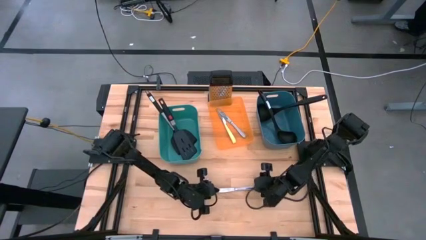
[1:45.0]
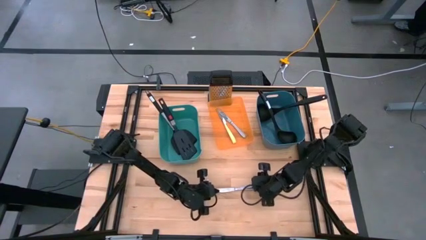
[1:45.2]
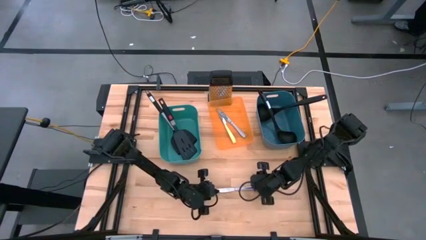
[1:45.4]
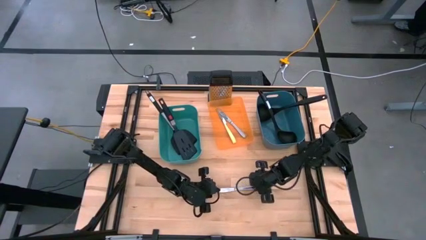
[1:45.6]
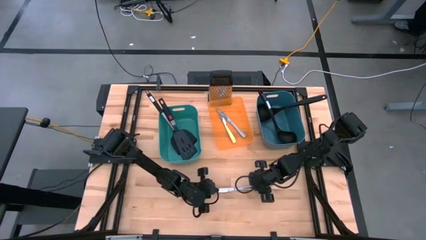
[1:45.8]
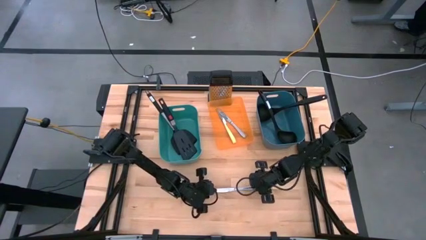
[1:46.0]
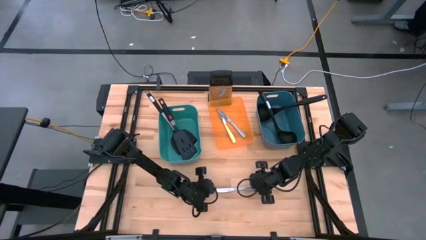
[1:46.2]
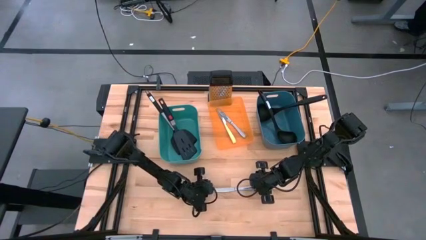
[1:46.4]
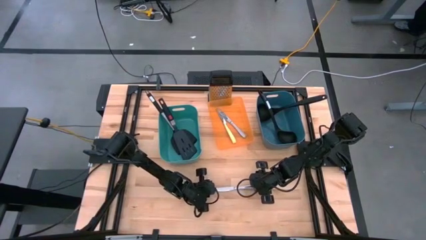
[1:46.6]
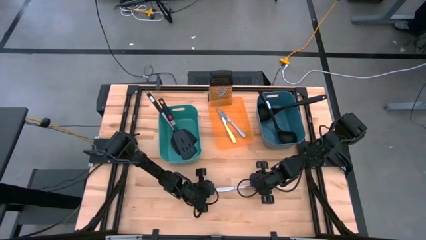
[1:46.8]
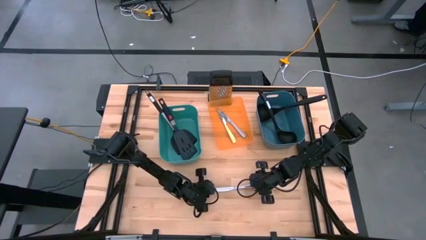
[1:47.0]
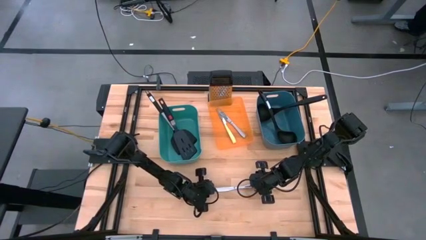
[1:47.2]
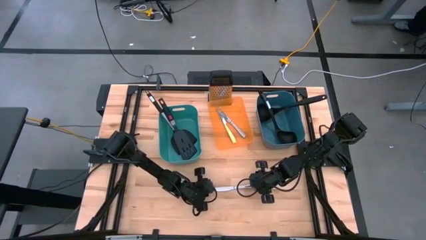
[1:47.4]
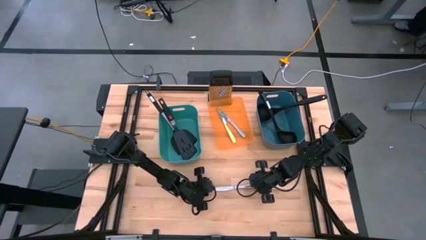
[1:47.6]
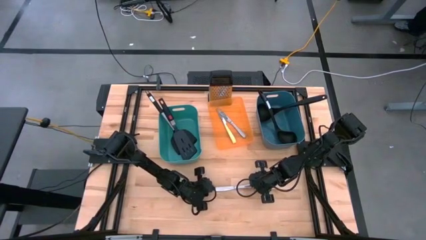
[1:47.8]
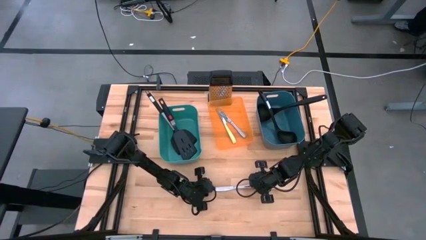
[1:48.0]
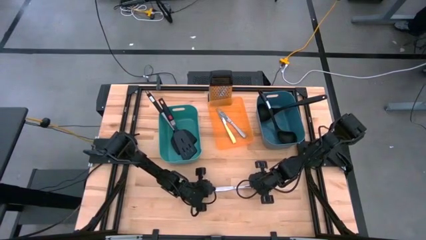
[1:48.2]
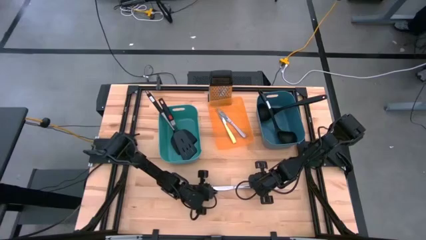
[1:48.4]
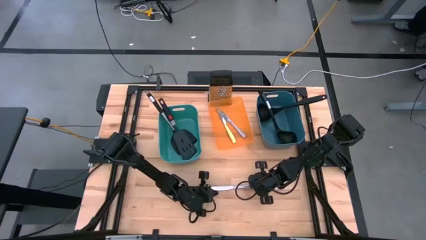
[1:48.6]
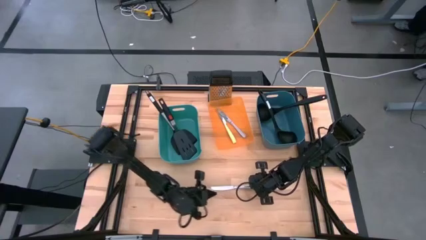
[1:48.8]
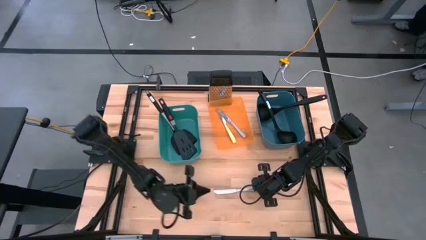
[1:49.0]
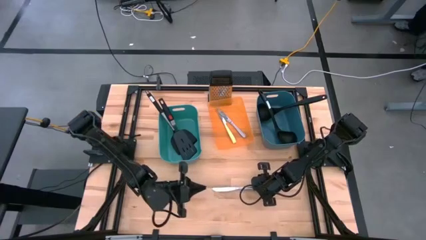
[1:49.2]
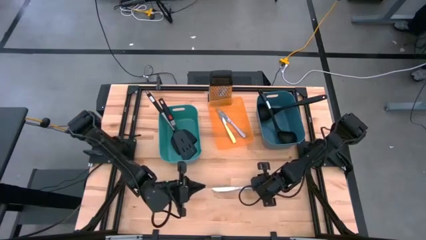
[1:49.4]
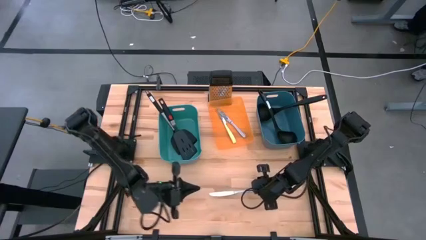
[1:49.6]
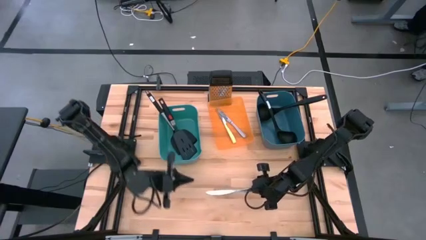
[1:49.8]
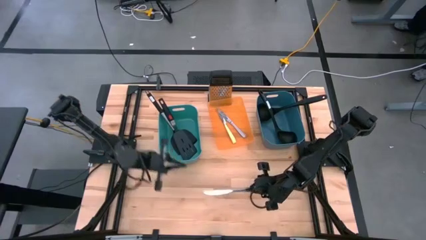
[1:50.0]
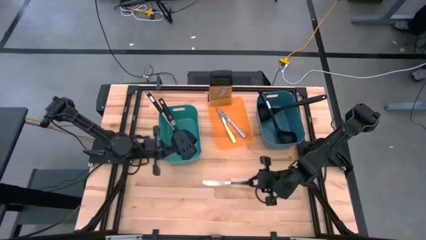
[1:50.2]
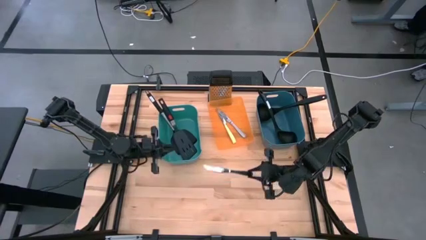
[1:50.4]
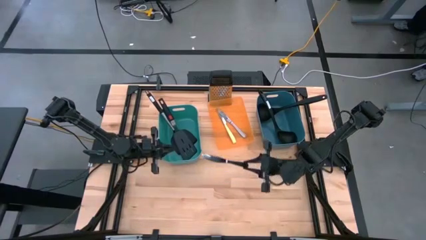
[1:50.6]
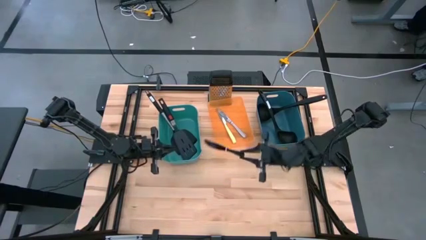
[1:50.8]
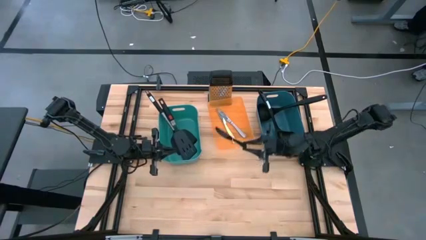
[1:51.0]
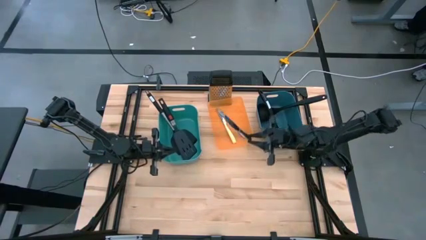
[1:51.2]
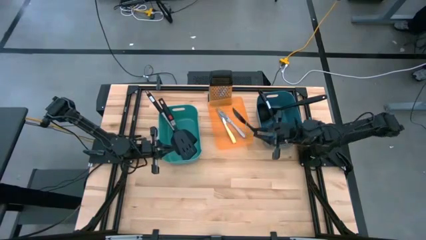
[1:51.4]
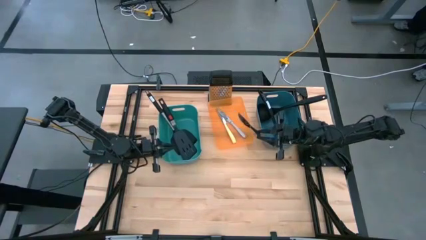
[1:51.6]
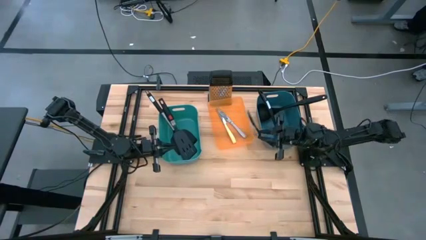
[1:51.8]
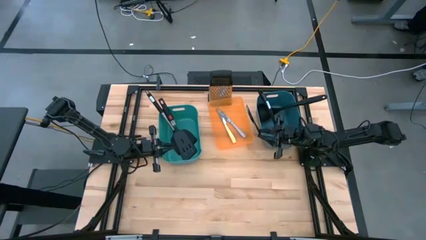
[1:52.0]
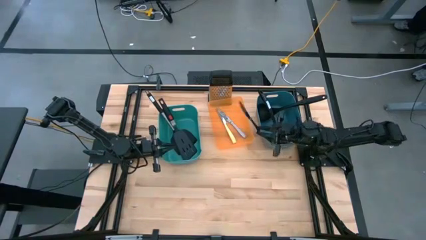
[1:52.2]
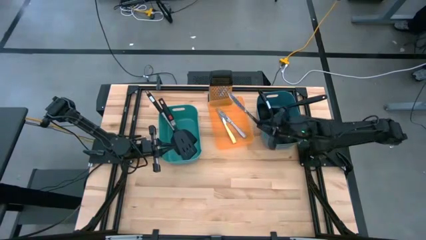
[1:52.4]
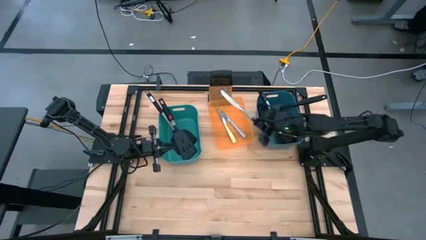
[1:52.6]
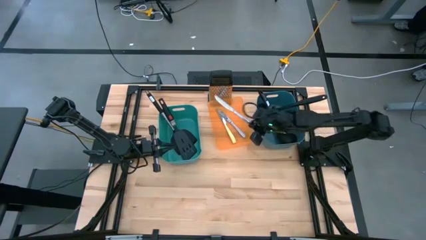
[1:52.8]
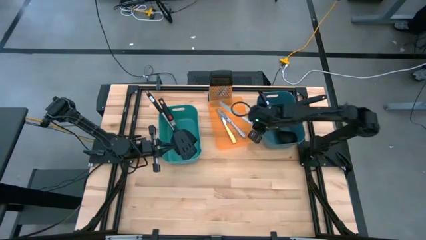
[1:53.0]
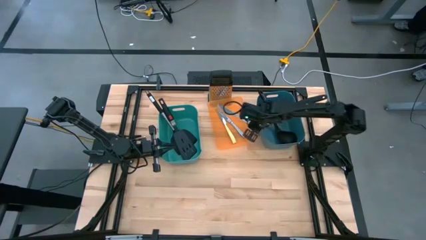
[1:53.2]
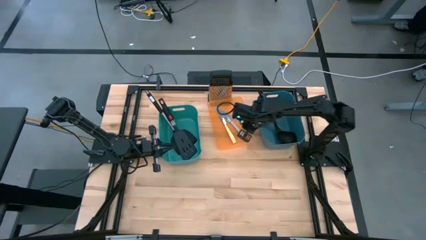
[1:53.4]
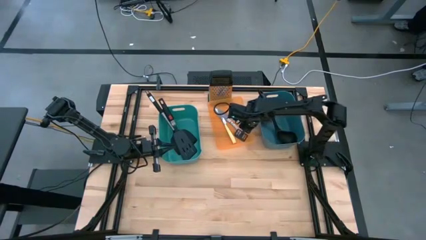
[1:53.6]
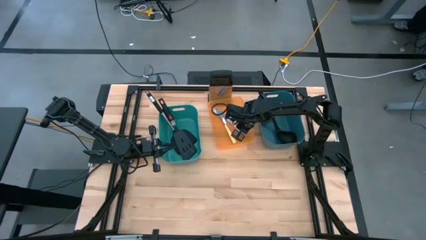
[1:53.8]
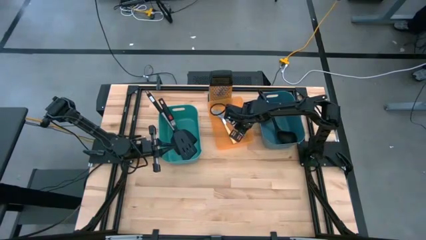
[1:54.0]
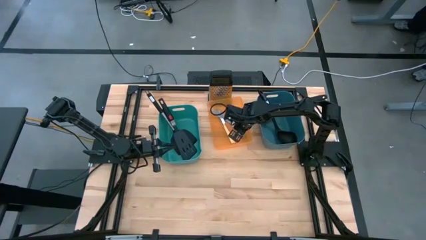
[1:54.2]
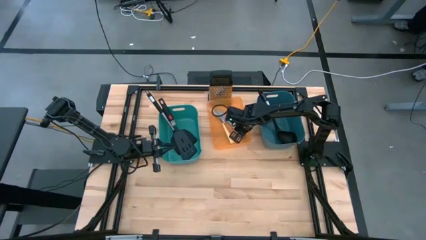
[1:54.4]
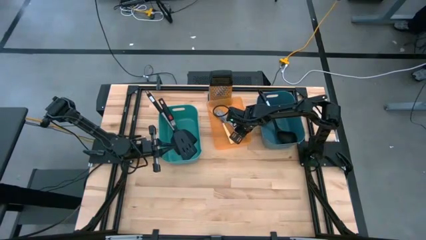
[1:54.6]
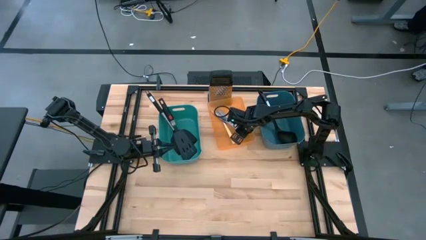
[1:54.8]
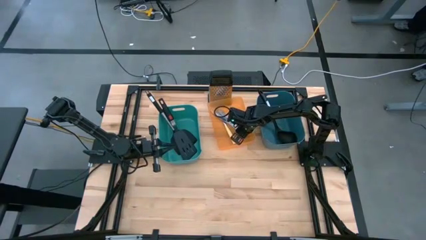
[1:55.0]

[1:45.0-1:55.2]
Task: Pick & Place Kitchen Items
Put the silver knife into the orange bin

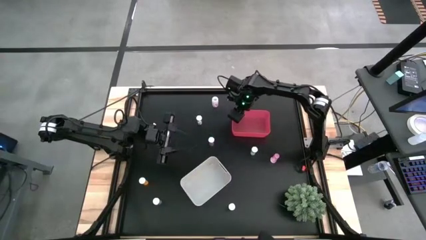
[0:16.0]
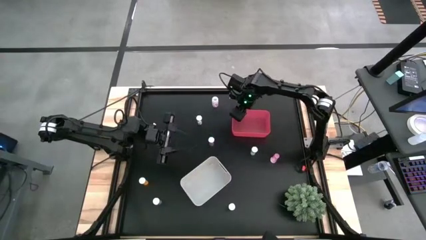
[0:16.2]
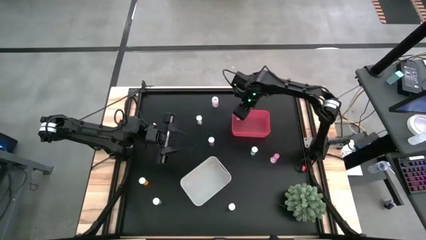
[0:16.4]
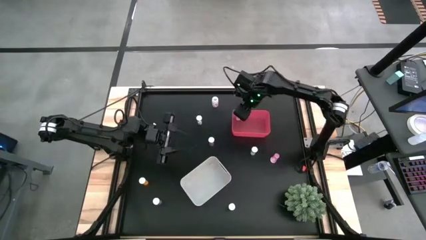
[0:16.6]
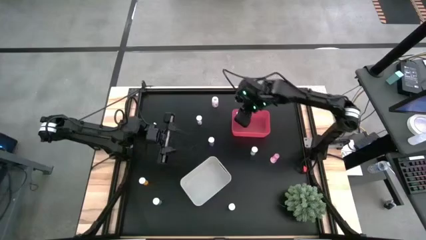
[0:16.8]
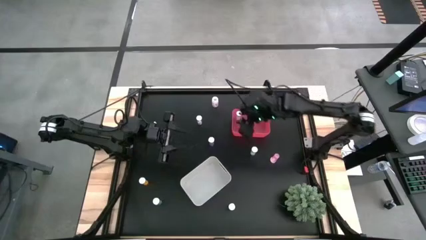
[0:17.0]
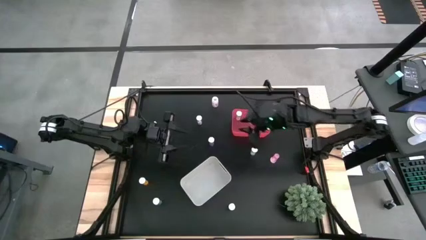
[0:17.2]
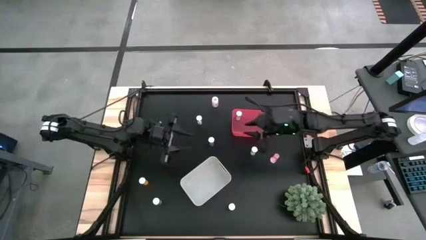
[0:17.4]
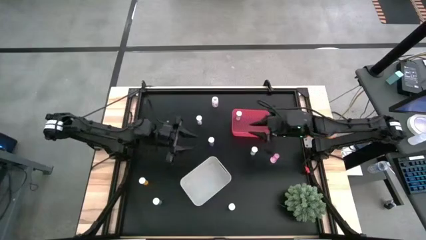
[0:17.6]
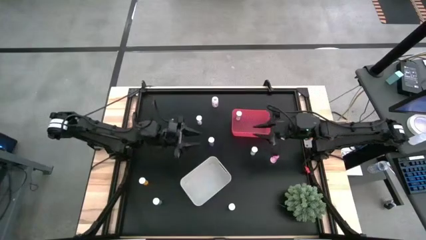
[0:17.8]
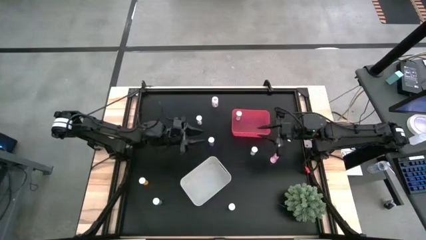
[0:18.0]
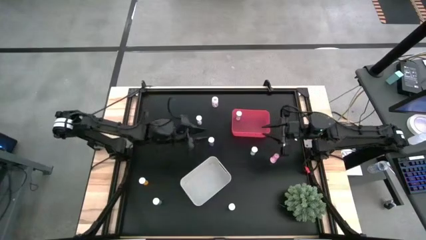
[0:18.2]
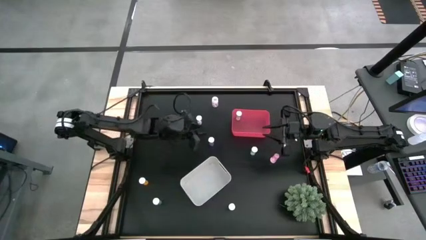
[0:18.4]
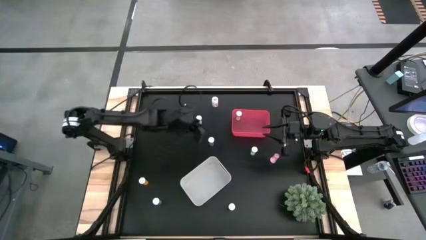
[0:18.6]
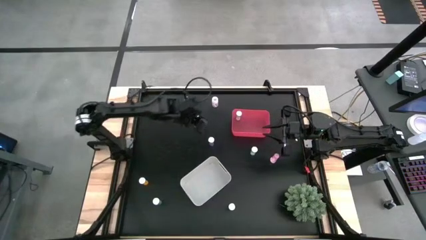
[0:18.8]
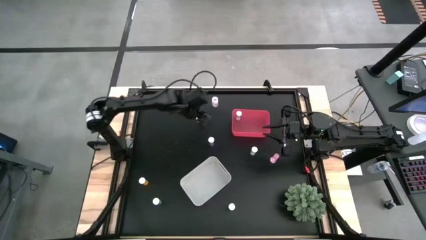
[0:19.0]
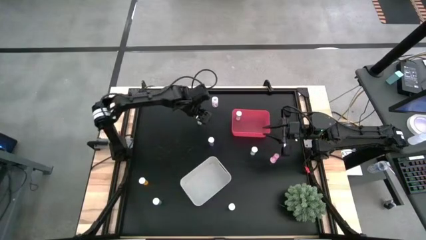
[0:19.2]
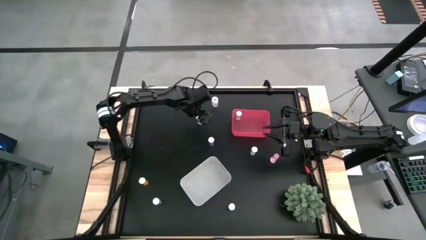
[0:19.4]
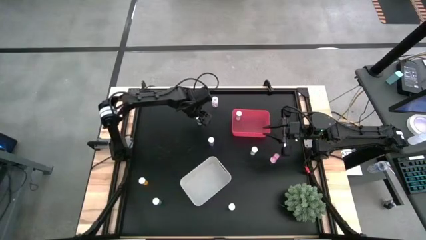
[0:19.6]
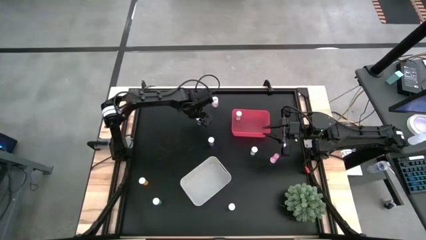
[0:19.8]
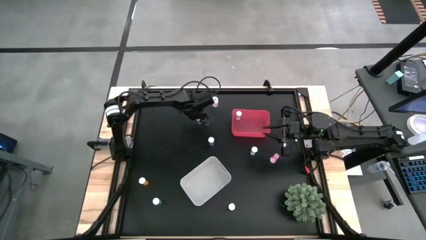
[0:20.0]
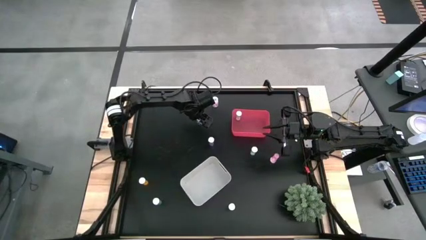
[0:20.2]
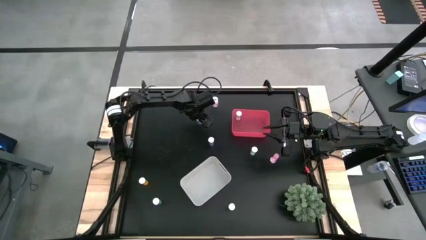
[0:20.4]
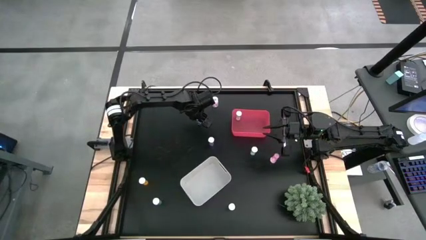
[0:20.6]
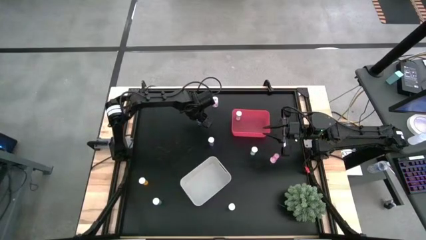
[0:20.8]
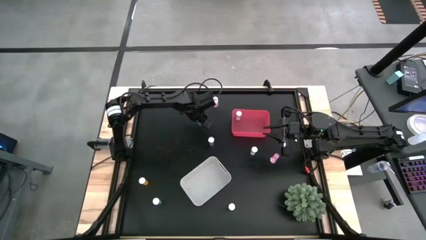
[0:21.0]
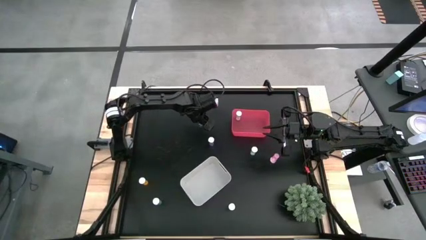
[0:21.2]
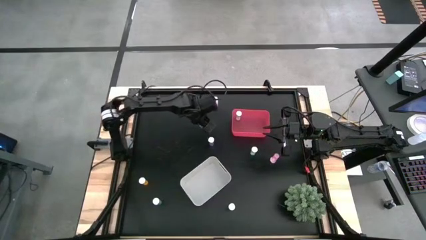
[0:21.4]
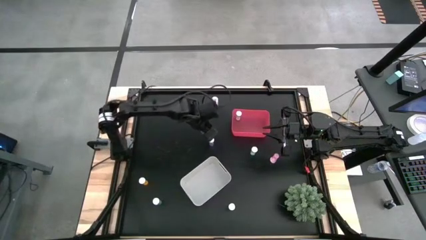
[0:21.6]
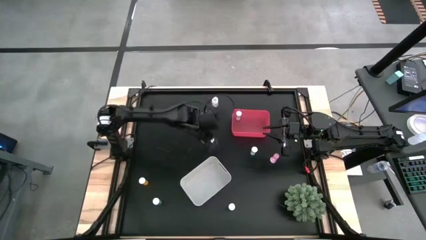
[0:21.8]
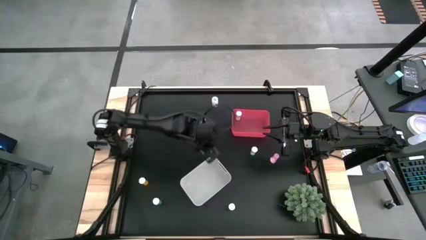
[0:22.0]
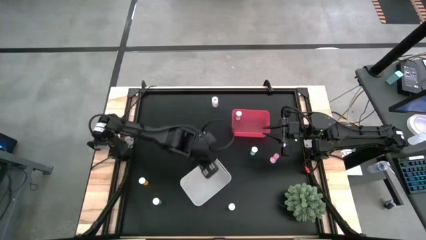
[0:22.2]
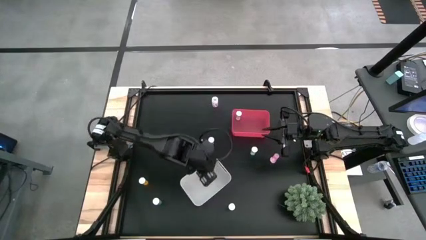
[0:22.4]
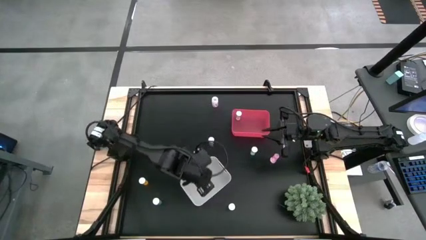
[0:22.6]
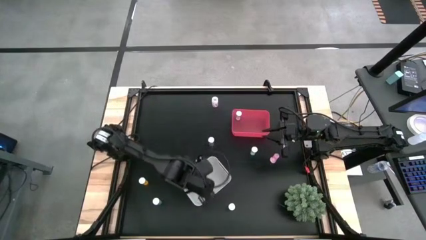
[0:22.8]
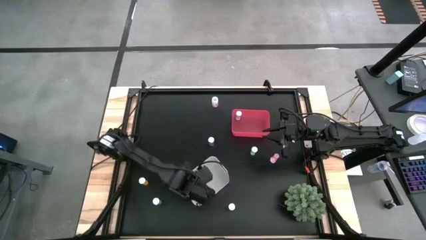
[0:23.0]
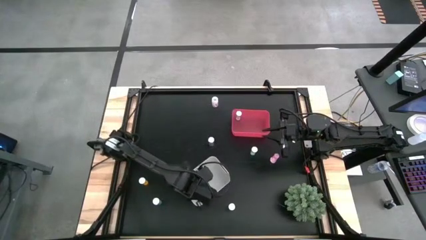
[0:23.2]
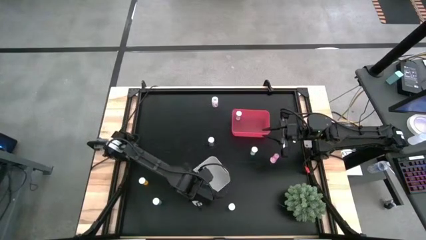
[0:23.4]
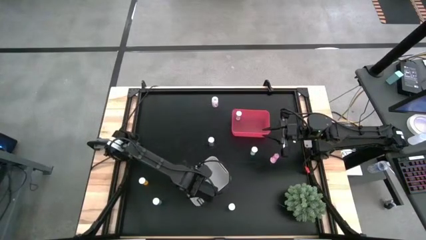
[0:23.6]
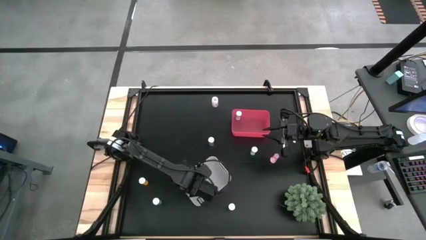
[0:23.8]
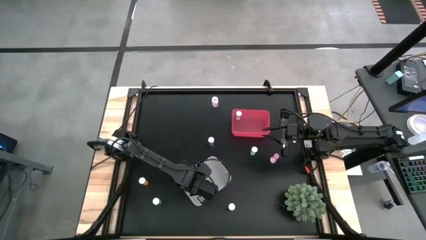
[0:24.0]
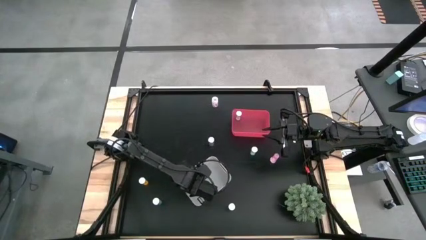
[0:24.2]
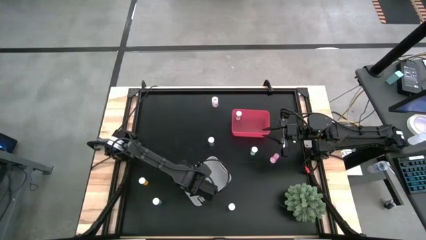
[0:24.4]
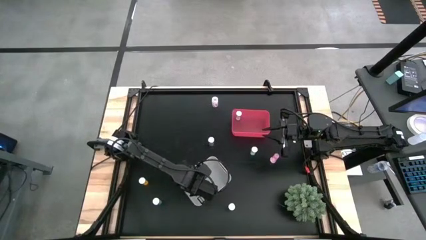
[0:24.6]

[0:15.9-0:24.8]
Task: Pick and place medicine bottles into bin by pill shape (circle, oval)
Put the blue capsule bottle into the white bin
